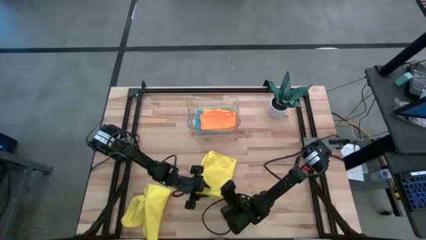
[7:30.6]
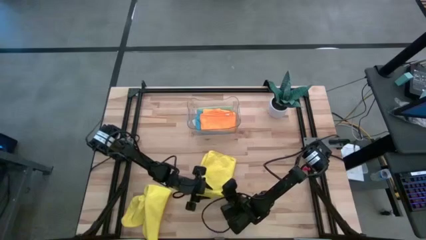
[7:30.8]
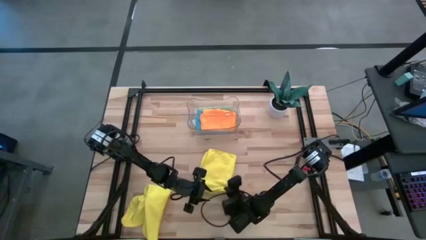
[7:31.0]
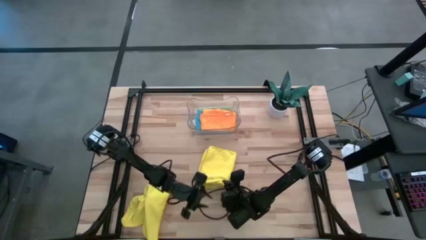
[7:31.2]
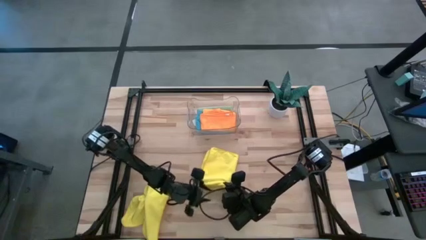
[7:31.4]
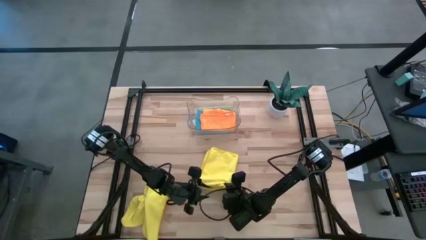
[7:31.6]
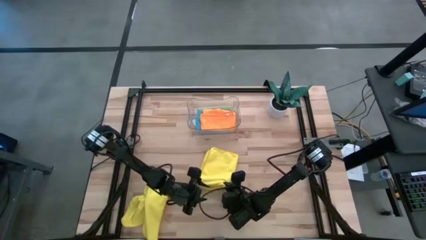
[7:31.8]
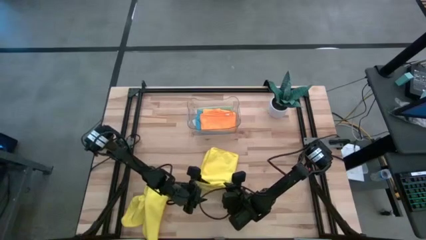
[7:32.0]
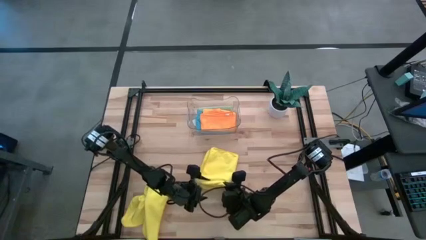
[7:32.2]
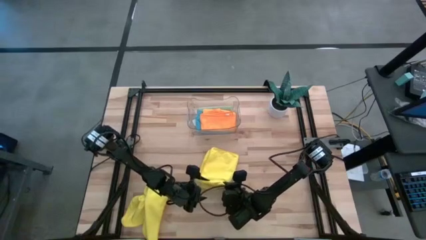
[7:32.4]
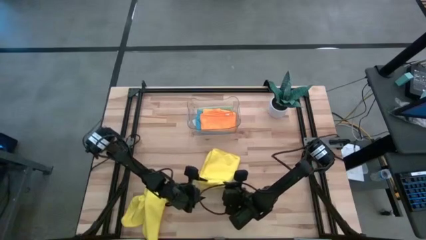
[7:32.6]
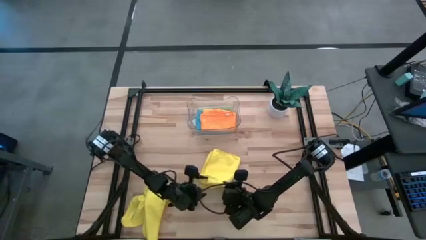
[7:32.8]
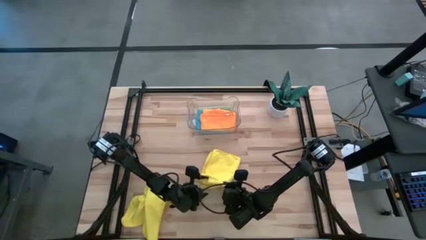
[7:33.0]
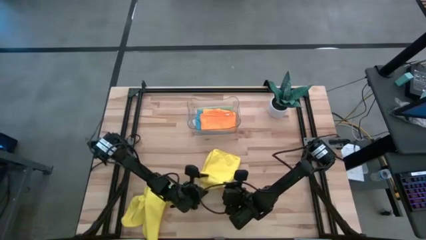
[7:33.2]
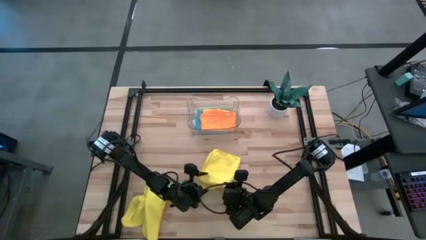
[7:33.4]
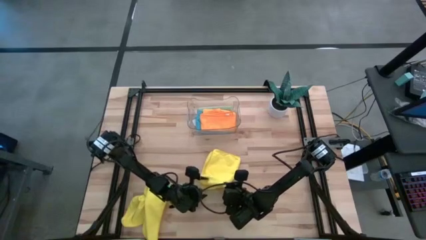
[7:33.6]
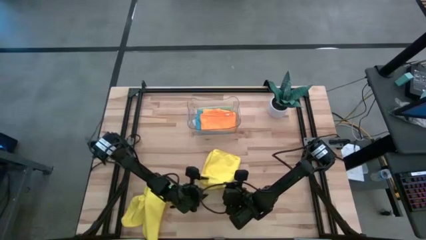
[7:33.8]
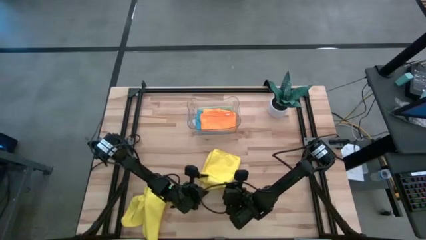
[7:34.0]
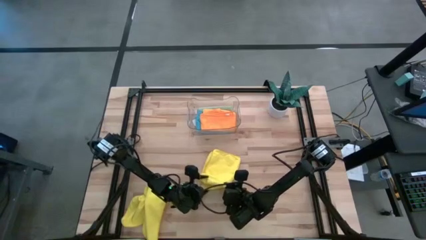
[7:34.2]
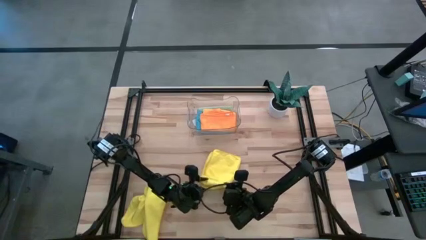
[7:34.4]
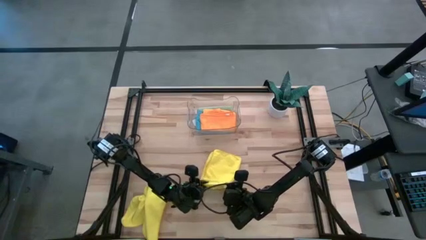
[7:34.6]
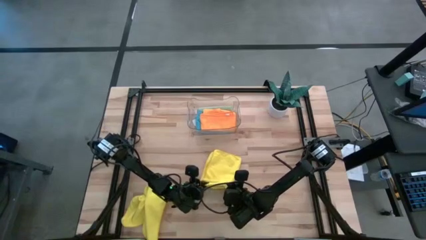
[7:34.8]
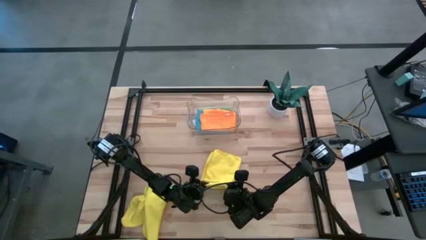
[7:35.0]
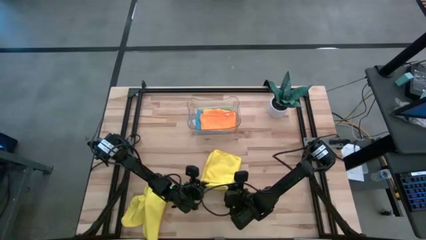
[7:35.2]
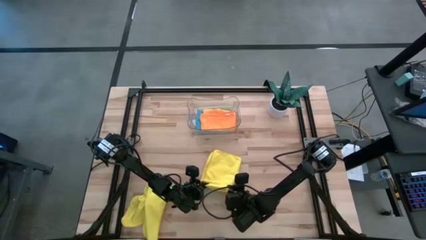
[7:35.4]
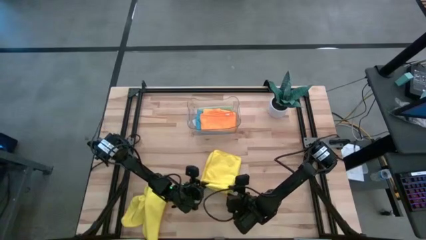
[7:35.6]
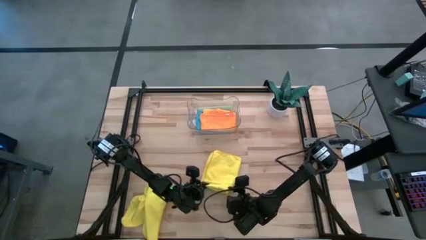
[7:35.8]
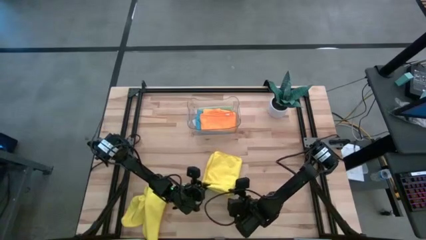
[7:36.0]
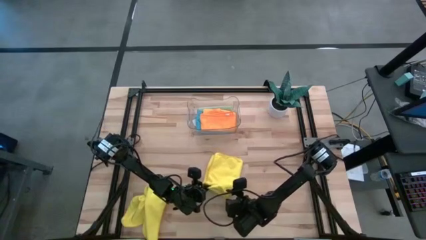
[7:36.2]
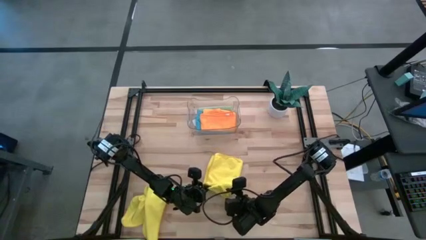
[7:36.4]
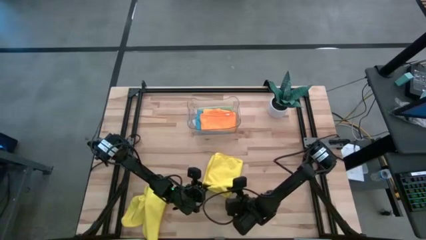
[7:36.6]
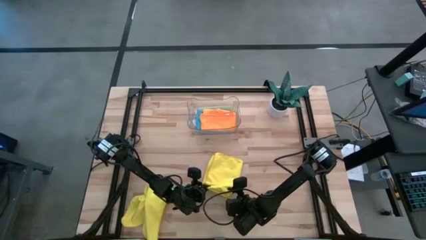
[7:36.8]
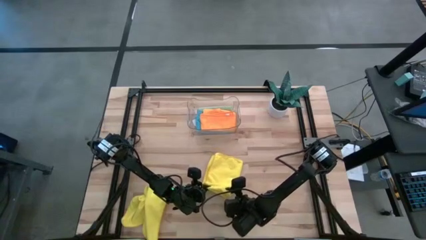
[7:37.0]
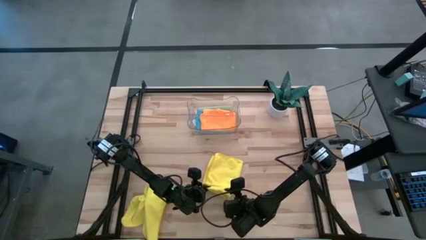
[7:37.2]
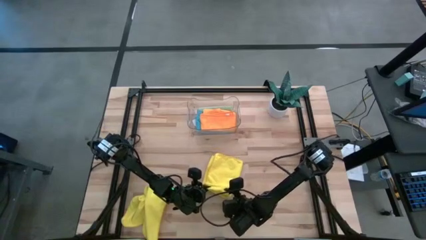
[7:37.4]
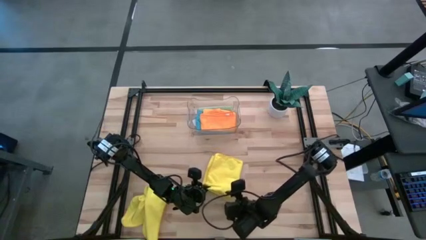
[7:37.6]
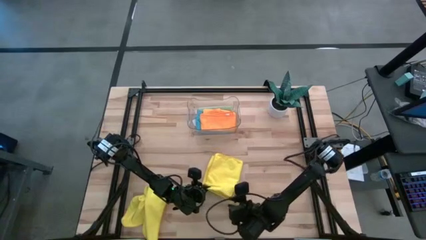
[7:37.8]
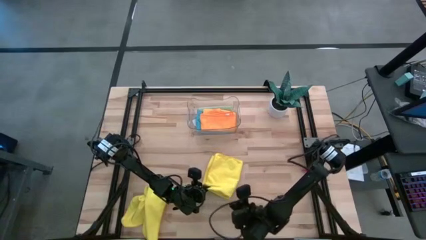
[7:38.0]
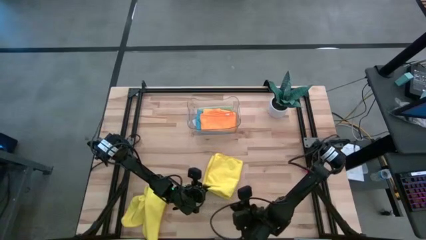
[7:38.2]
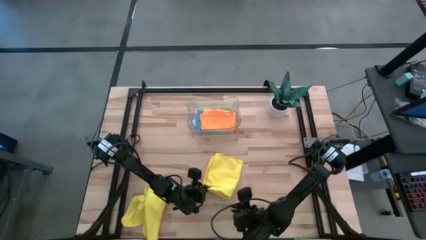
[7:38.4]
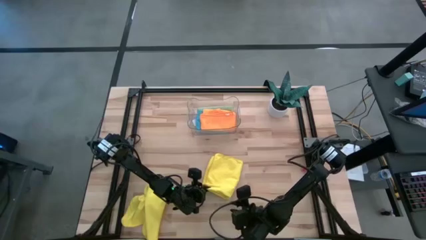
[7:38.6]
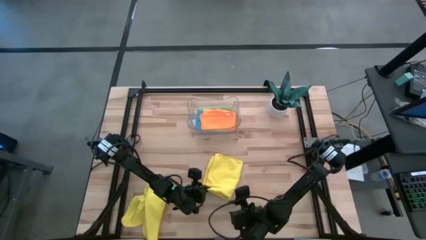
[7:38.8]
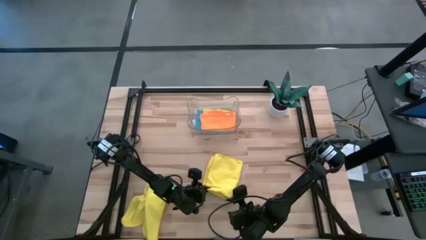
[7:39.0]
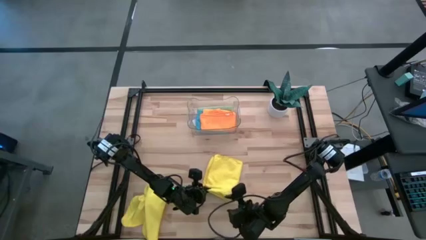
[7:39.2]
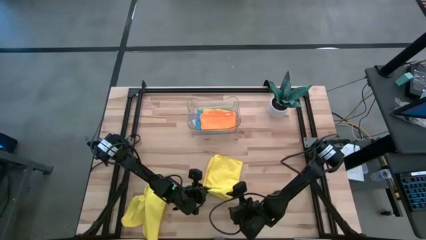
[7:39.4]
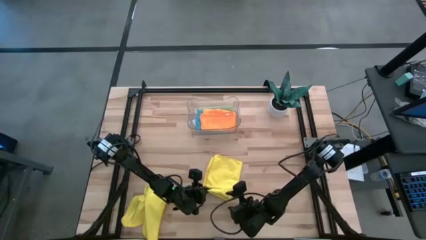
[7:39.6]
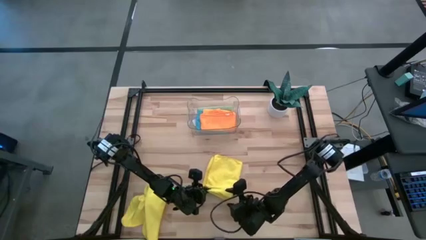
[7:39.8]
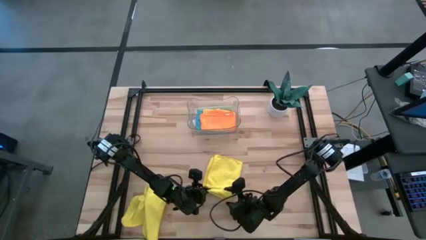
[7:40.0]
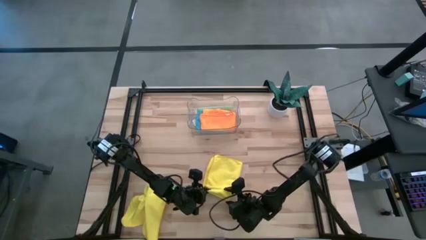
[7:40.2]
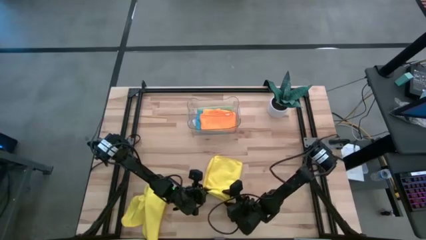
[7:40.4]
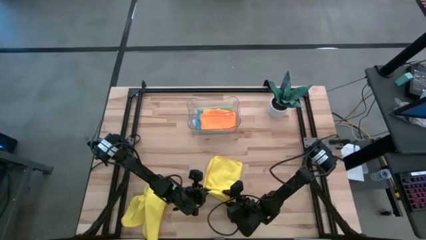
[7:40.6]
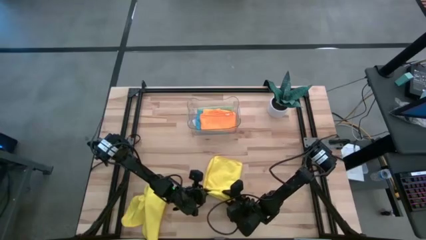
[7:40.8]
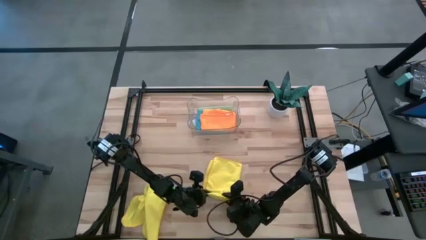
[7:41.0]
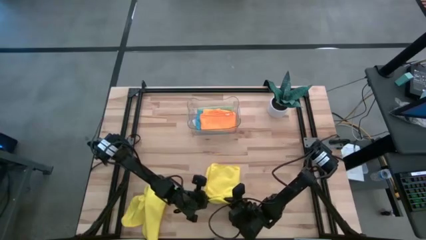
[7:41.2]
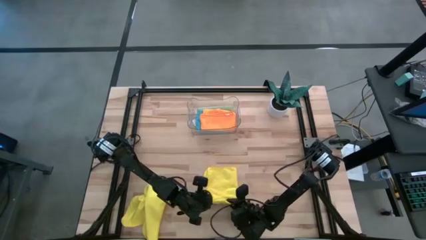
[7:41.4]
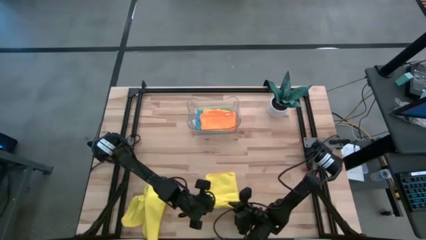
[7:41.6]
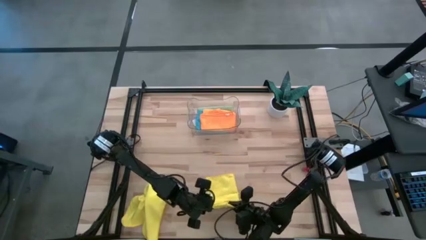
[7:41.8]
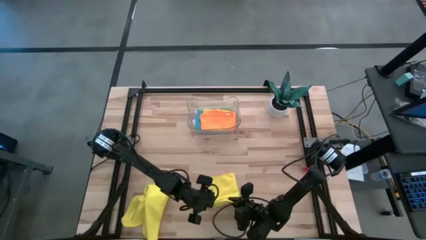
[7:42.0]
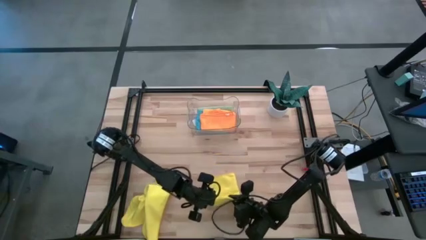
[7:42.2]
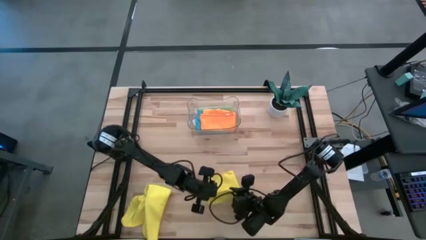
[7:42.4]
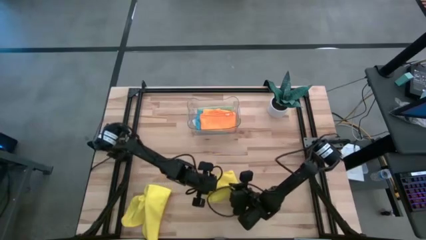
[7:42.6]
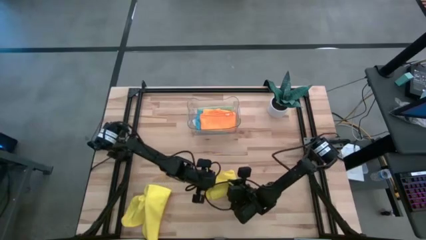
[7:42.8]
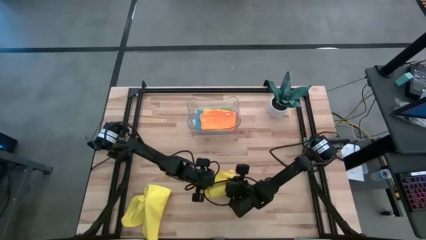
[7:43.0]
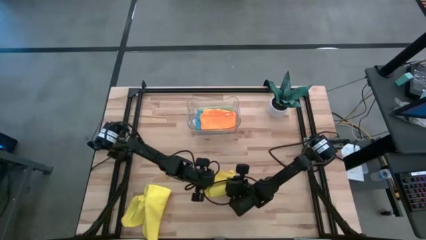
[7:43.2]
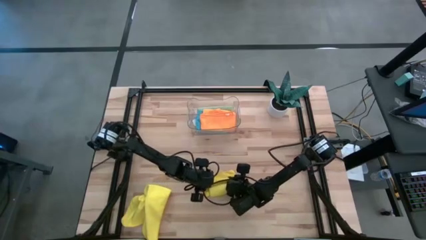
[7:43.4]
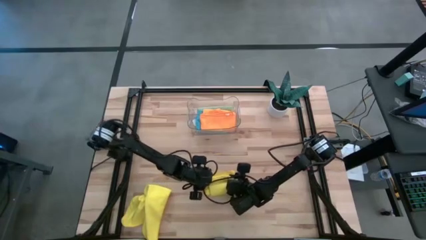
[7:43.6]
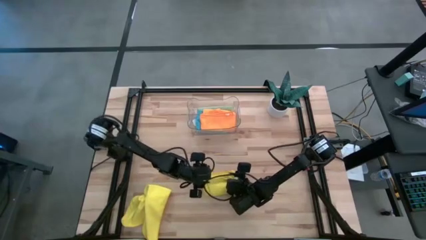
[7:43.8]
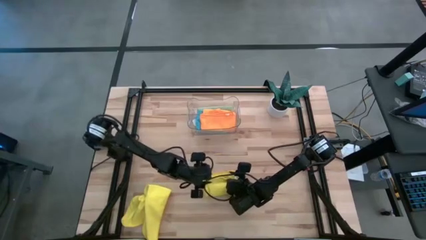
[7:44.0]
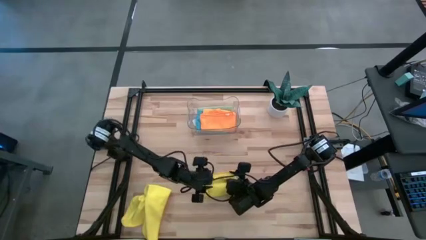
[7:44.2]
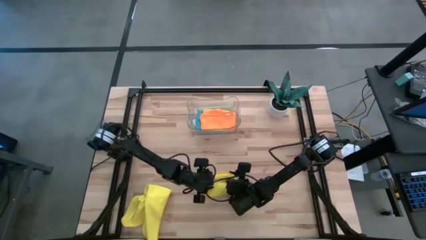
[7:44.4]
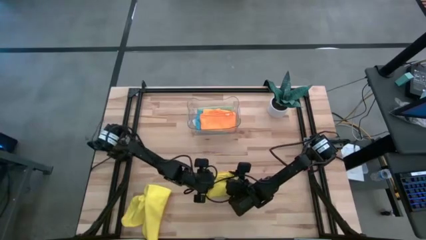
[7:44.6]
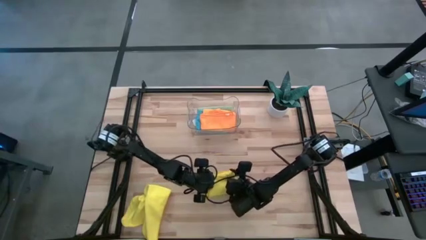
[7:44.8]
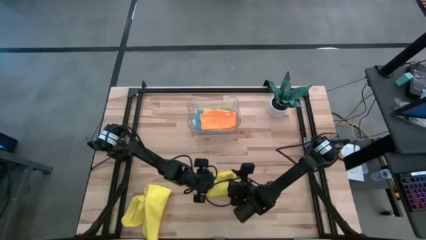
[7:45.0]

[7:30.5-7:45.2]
Task: Fold microfiber towels
Fold the top yellow towel
